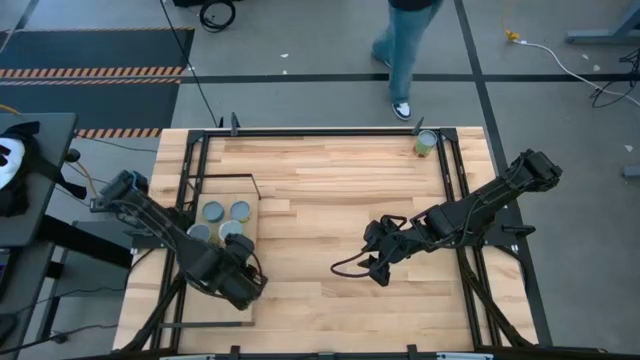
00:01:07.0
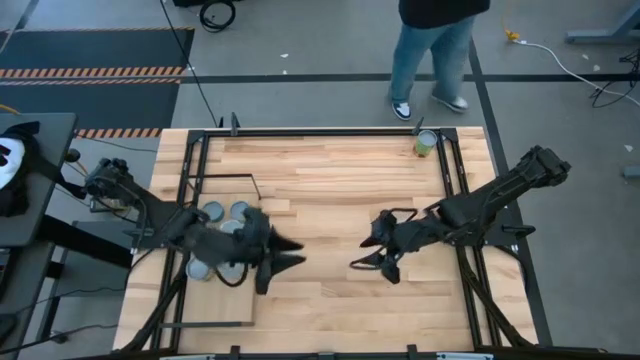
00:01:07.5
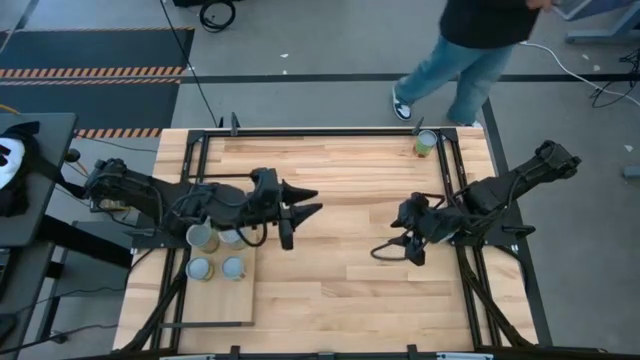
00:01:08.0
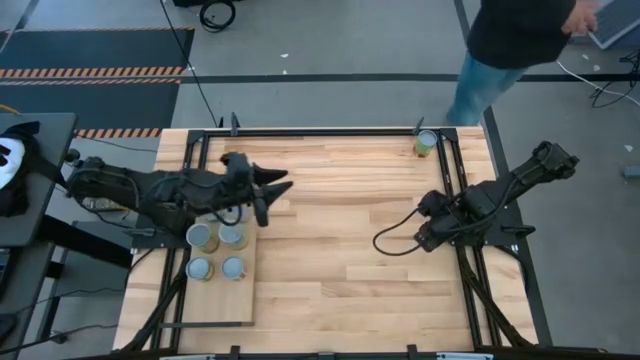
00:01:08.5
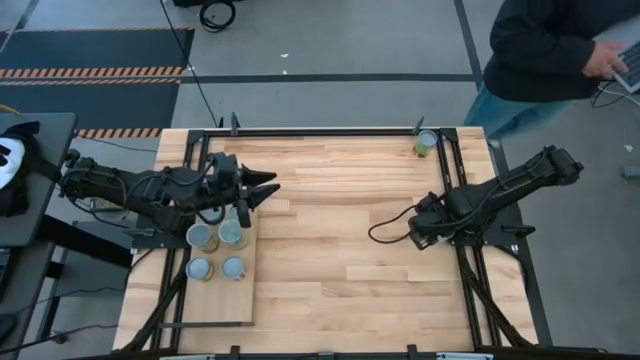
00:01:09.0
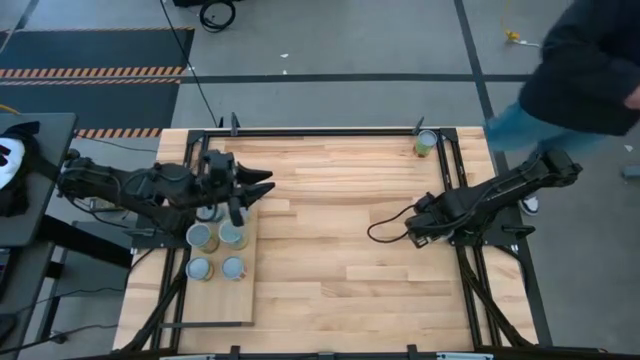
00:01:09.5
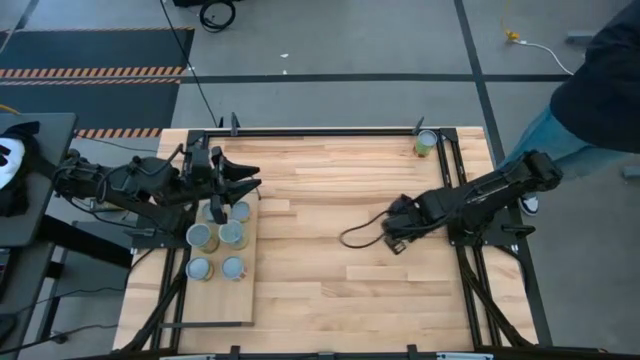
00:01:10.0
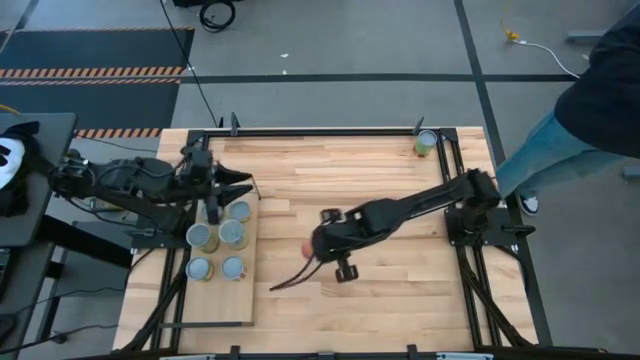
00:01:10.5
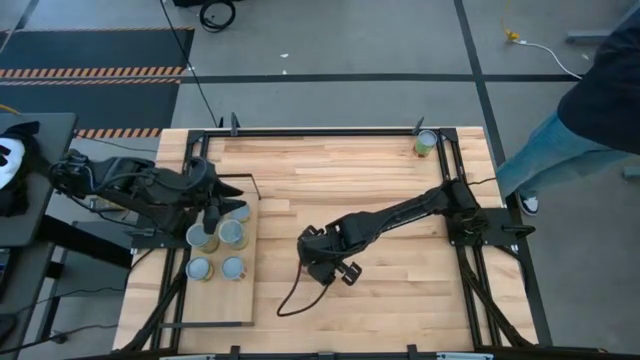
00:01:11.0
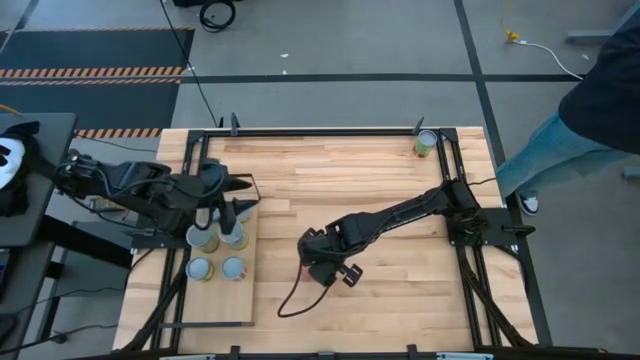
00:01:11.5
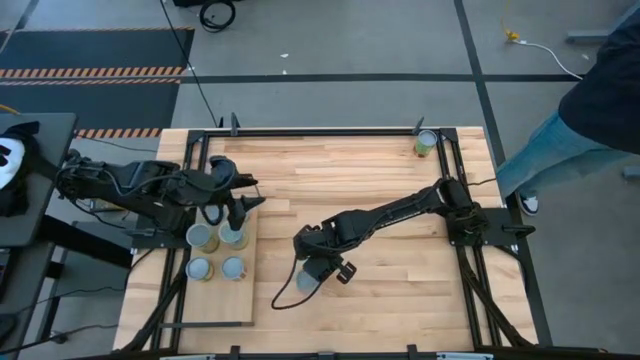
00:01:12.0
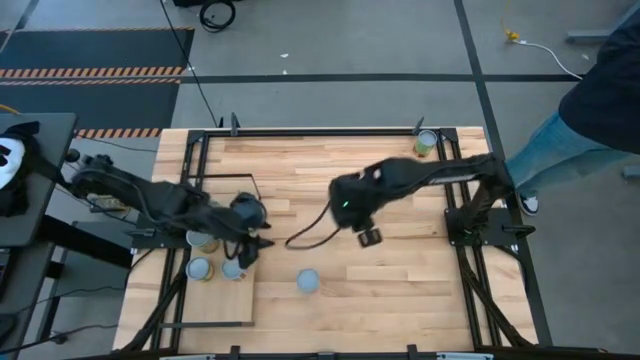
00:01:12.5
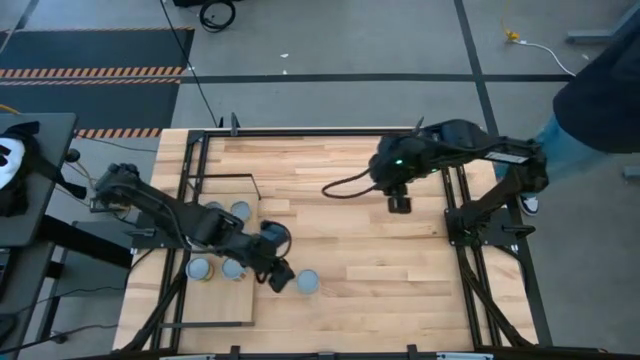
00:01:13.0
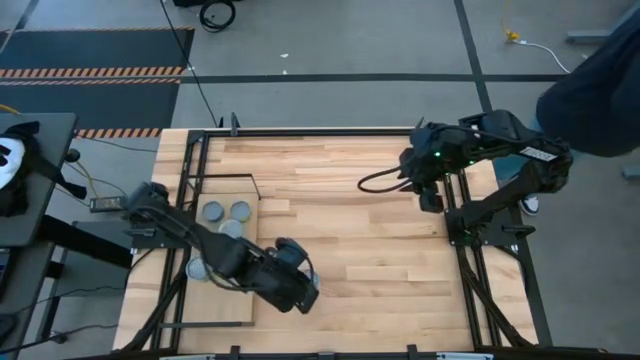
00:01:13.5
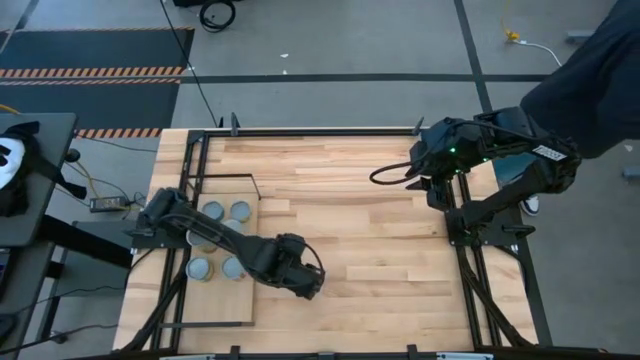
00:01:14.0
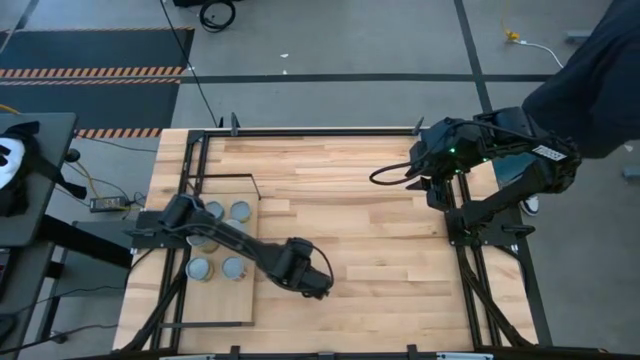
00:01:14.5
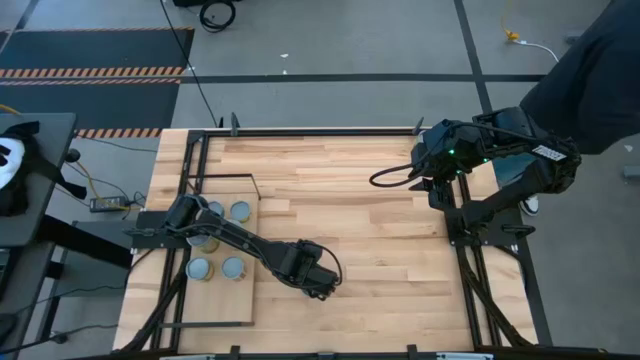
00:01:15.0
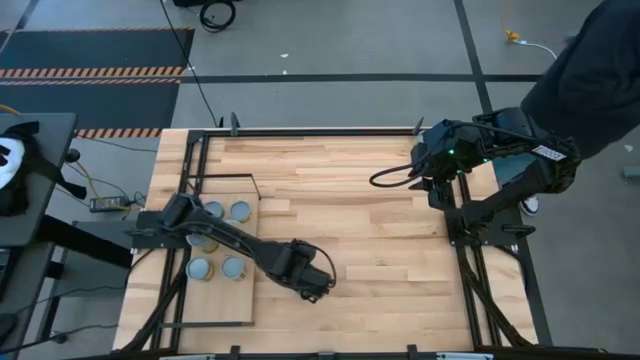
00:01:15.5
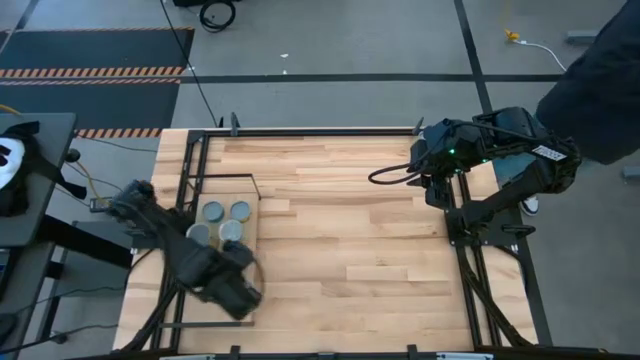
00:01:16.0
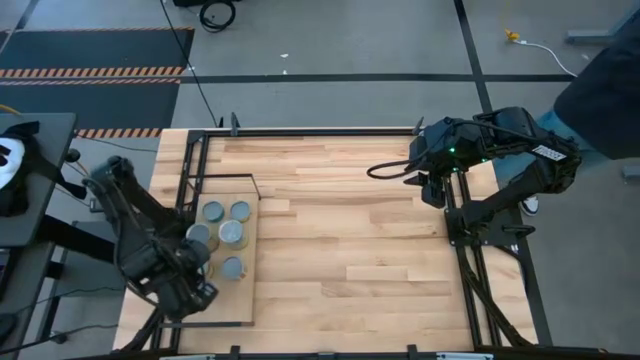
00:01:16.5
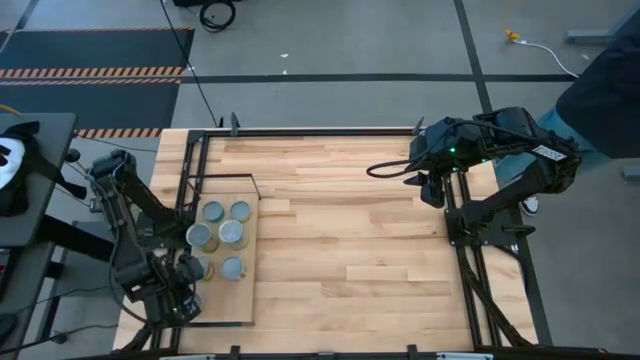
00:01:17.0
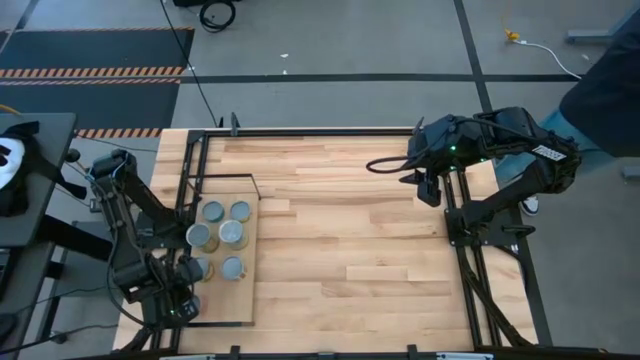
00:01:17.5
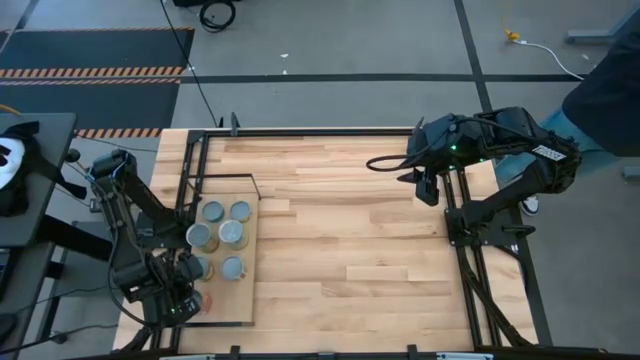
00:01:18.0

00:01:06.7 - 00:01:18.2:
Task: Pick and place cans onto a shelf
Put the canned mixed fruits on the shelf

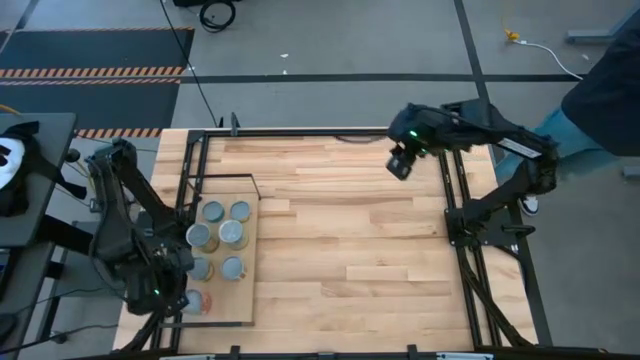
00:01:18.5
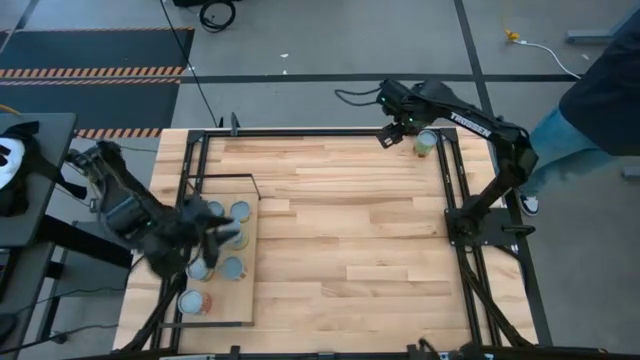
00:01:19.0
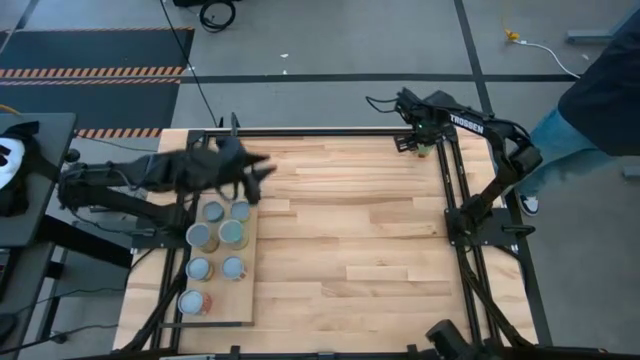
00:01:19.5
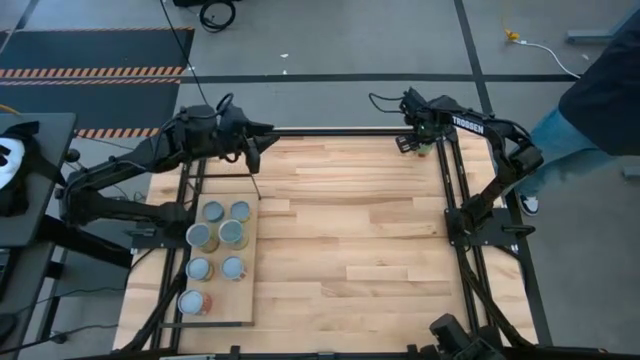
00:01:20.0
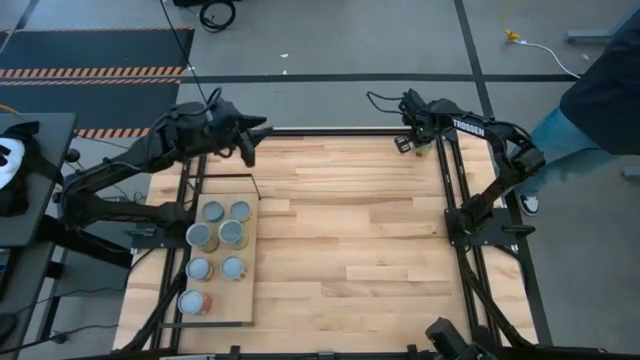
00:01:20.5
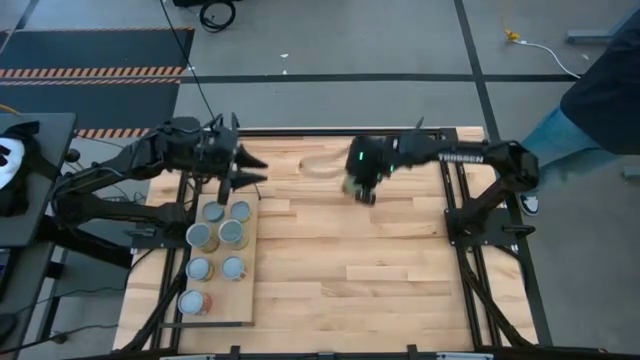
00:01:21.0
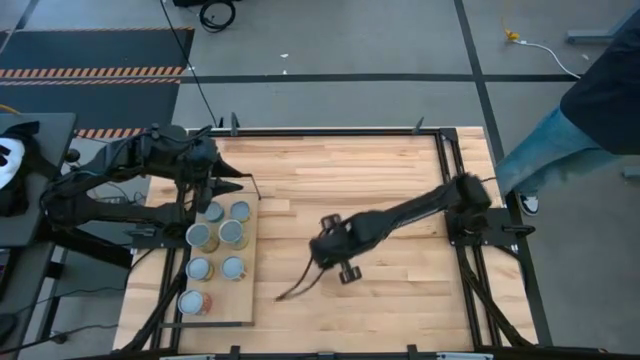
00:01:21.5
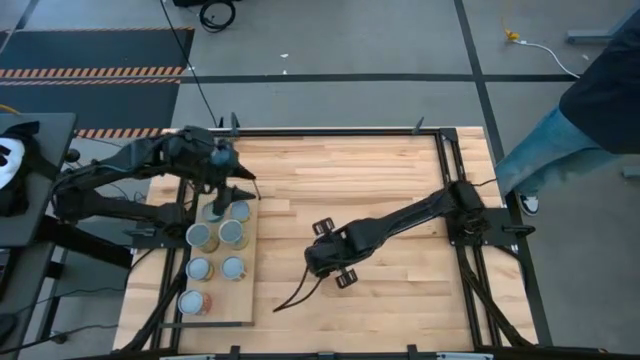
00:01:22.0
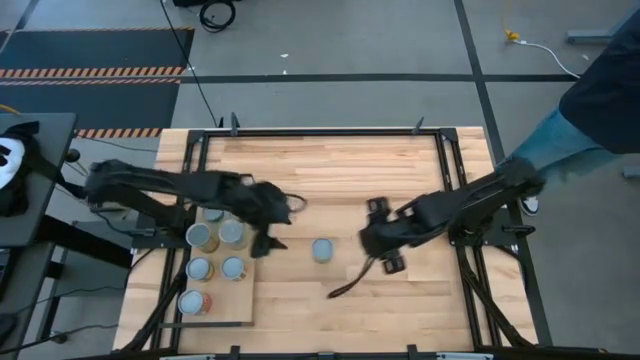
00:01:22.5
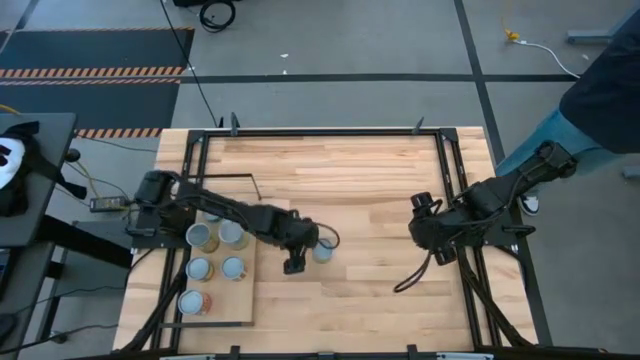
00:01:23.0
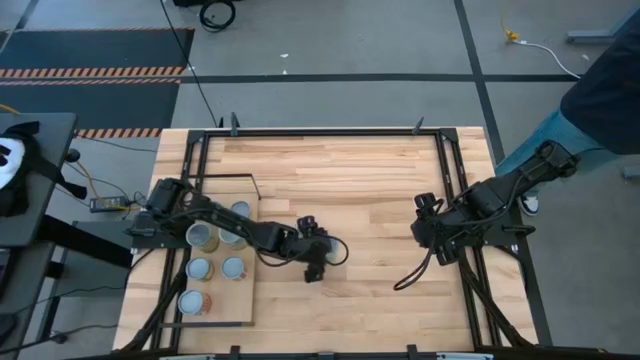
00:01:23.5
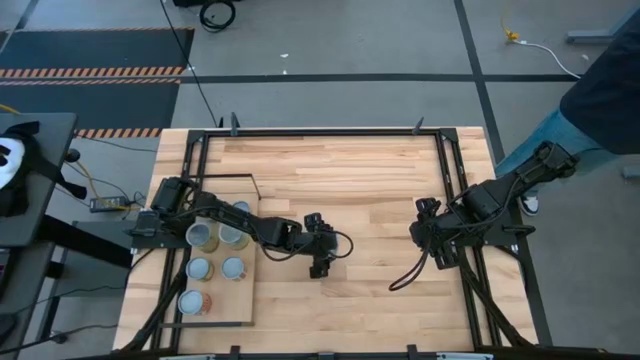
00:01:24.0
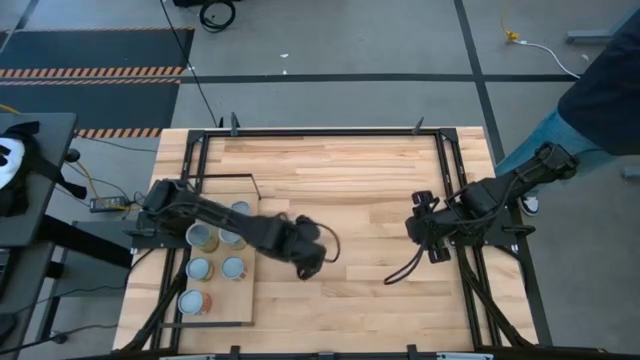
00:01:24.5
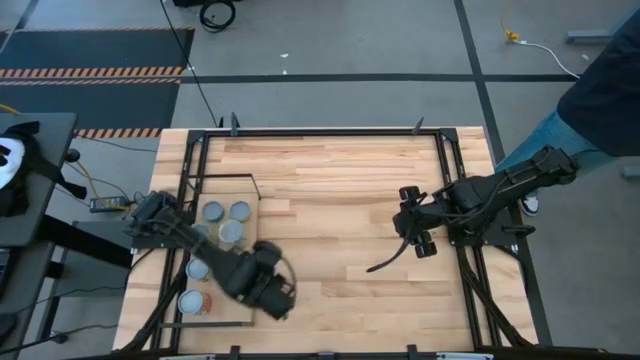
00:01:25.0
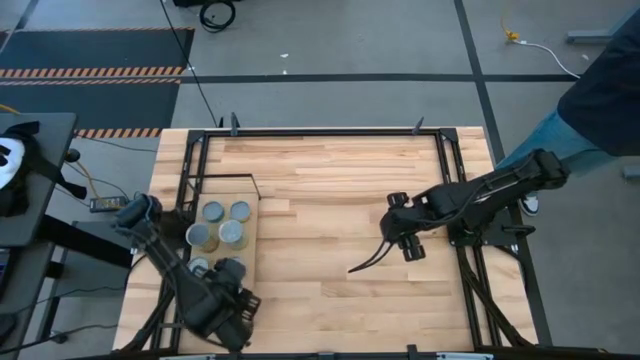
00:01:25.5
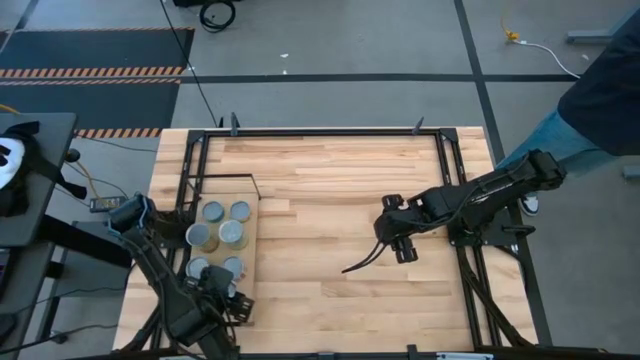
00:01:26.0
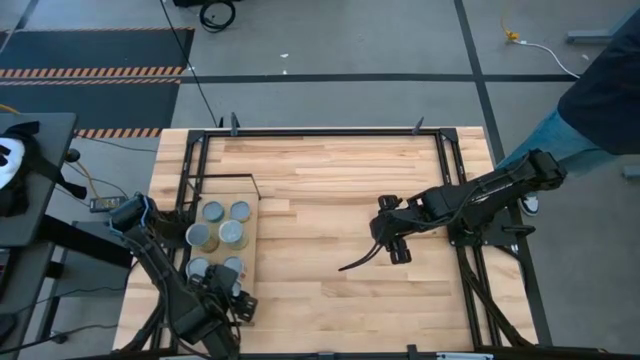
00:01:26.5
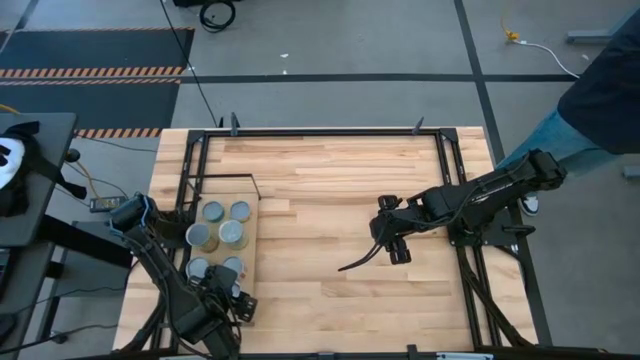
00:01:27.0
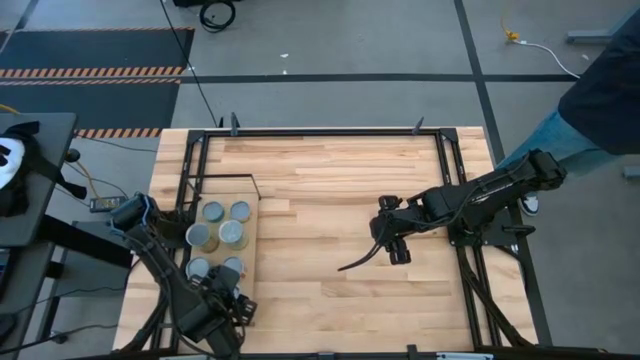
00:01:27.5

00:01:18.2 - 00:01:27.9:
Put the canned spaghetti sauce on the shelf
